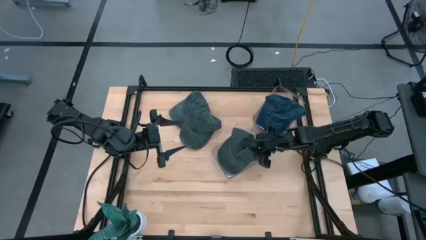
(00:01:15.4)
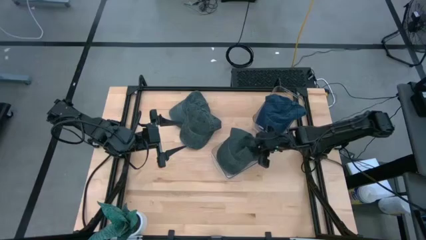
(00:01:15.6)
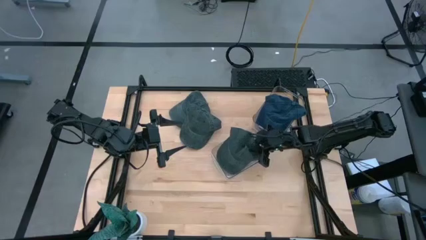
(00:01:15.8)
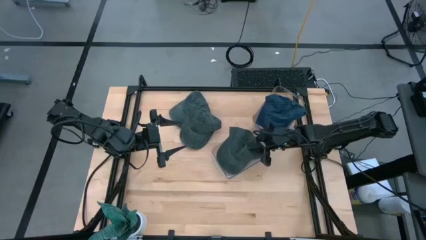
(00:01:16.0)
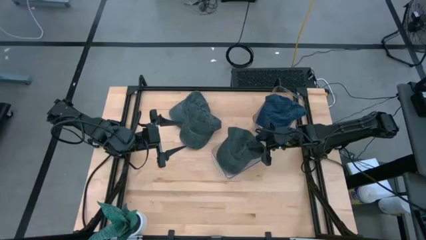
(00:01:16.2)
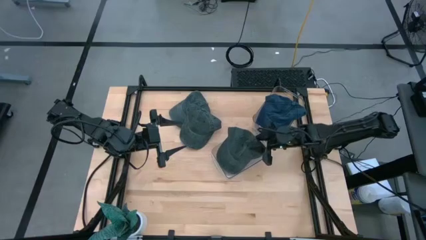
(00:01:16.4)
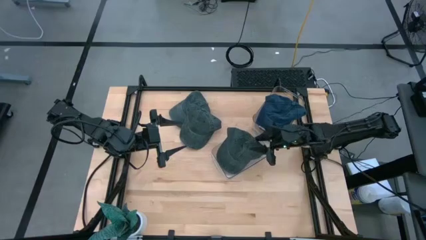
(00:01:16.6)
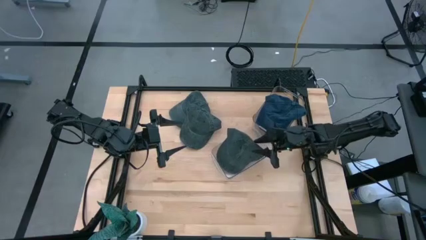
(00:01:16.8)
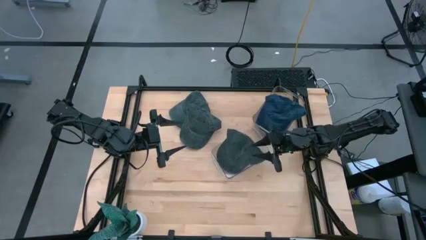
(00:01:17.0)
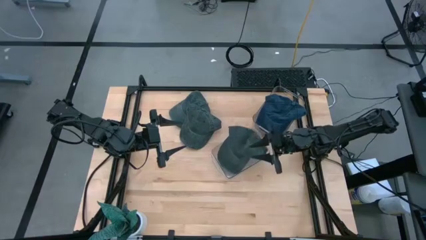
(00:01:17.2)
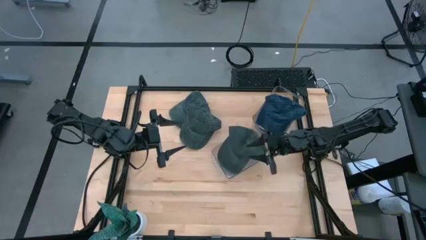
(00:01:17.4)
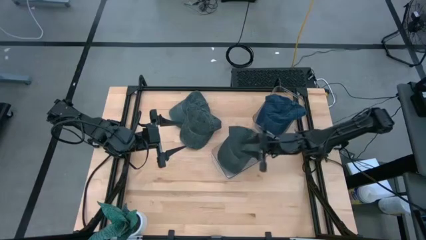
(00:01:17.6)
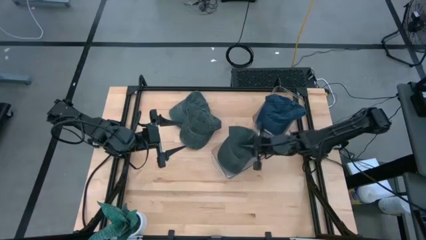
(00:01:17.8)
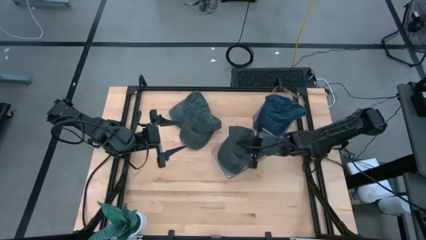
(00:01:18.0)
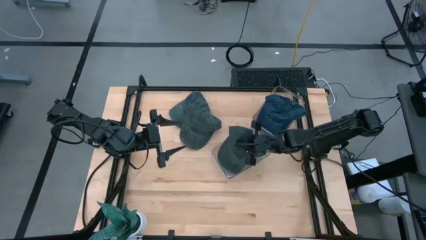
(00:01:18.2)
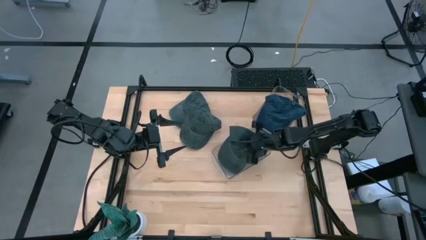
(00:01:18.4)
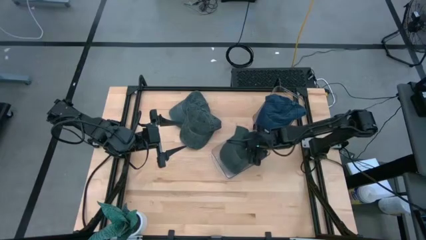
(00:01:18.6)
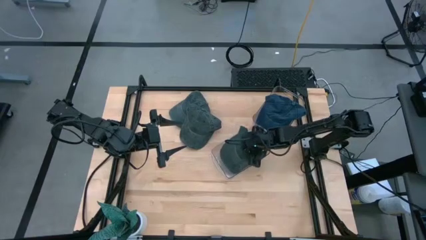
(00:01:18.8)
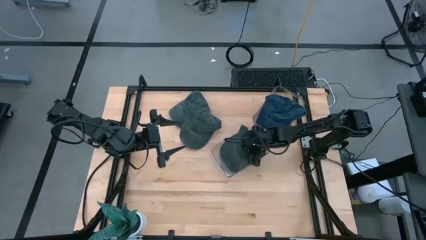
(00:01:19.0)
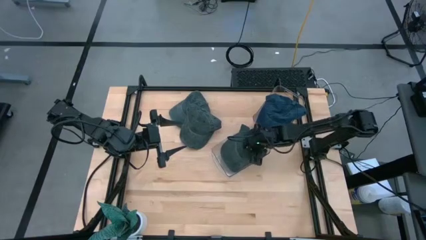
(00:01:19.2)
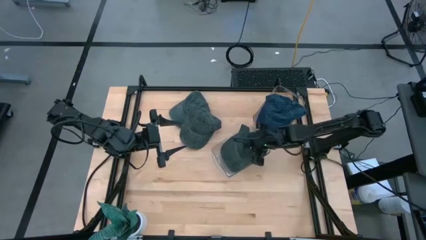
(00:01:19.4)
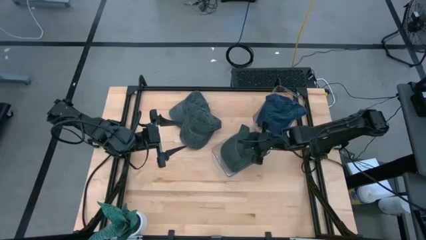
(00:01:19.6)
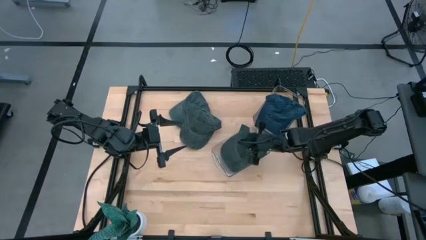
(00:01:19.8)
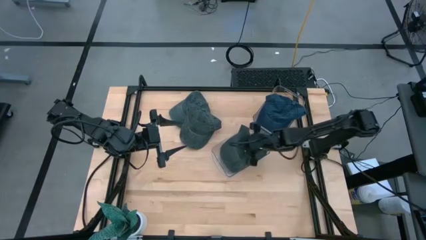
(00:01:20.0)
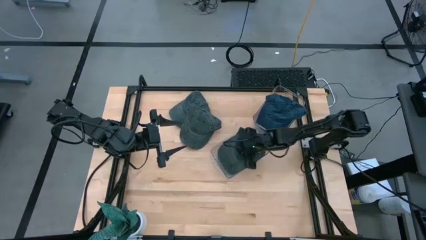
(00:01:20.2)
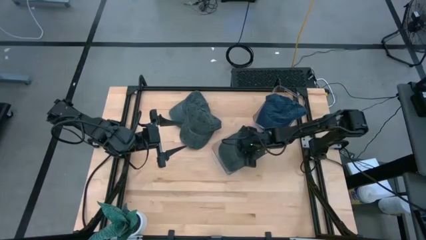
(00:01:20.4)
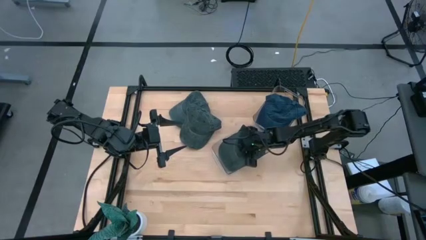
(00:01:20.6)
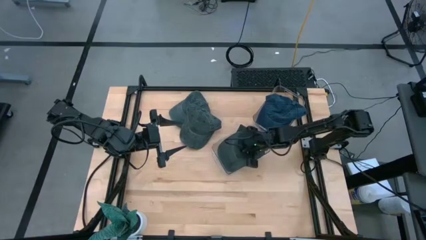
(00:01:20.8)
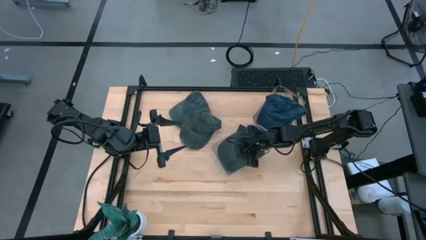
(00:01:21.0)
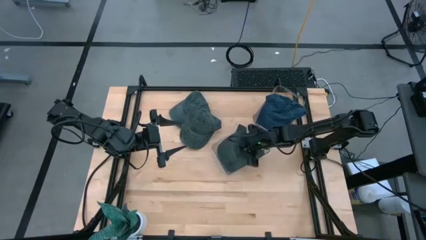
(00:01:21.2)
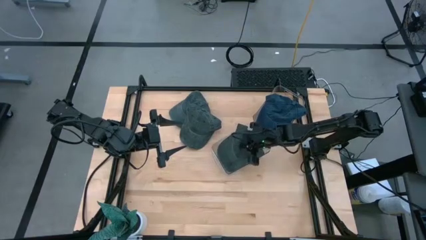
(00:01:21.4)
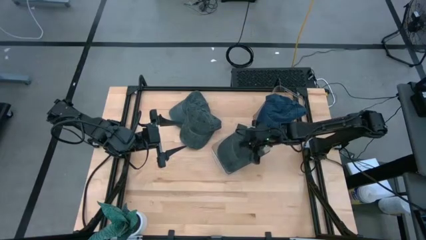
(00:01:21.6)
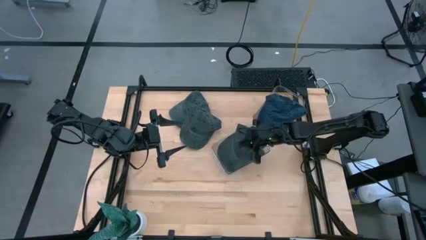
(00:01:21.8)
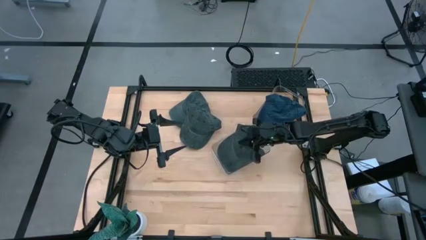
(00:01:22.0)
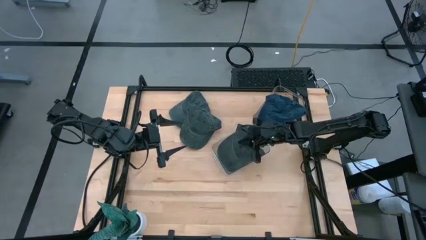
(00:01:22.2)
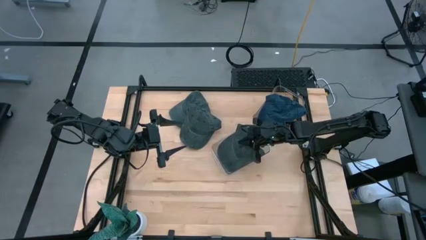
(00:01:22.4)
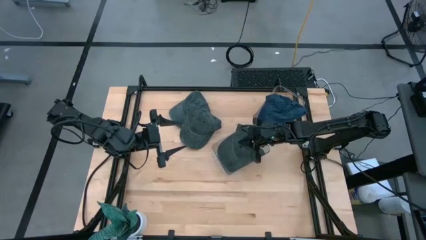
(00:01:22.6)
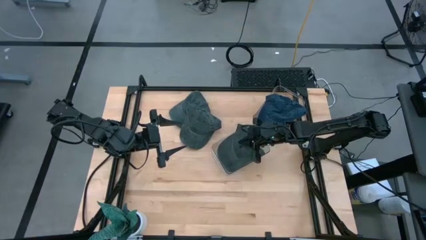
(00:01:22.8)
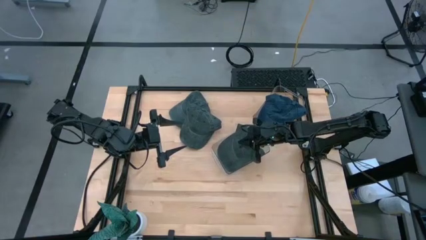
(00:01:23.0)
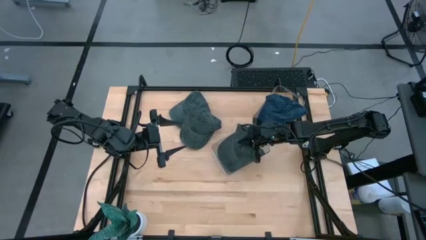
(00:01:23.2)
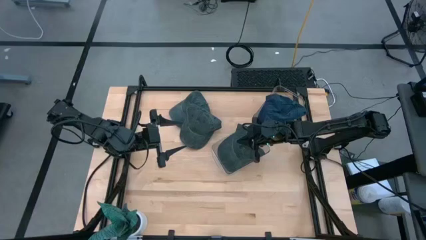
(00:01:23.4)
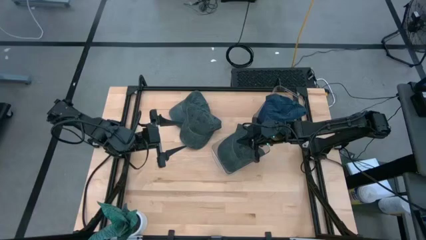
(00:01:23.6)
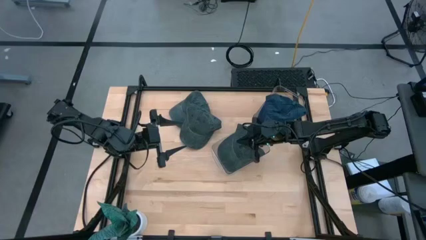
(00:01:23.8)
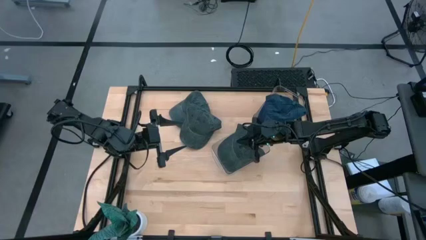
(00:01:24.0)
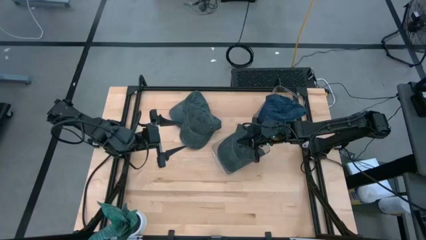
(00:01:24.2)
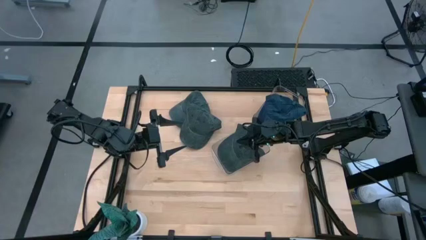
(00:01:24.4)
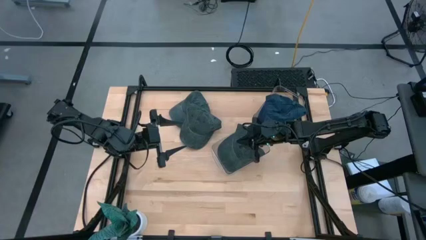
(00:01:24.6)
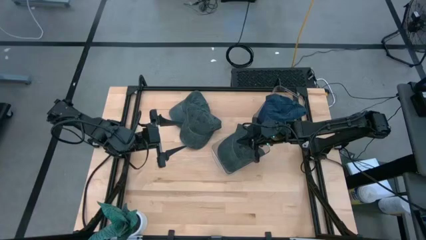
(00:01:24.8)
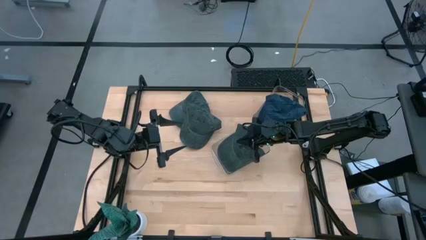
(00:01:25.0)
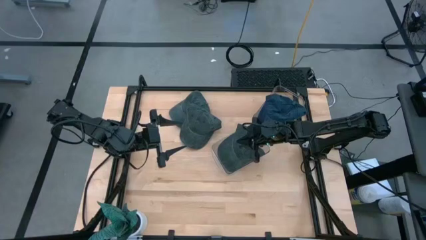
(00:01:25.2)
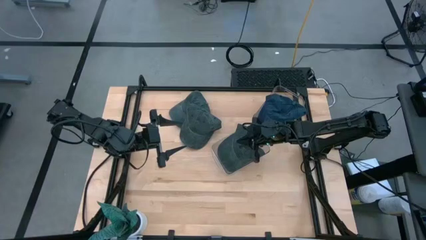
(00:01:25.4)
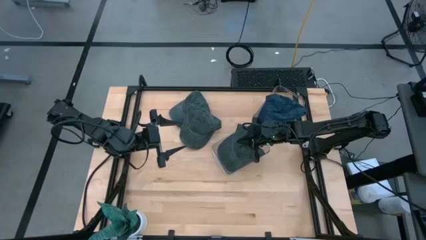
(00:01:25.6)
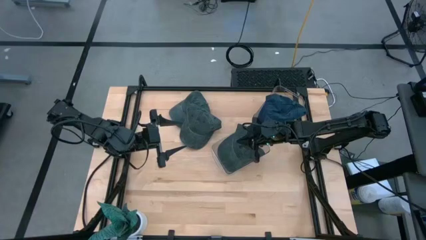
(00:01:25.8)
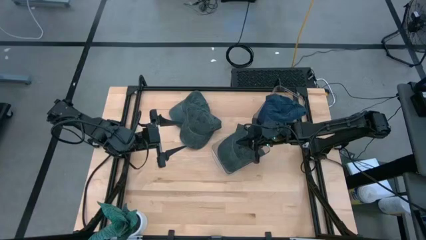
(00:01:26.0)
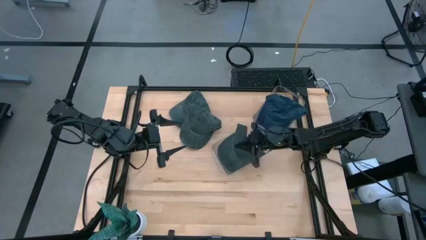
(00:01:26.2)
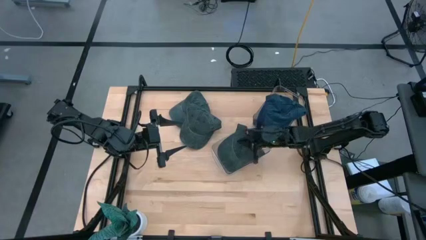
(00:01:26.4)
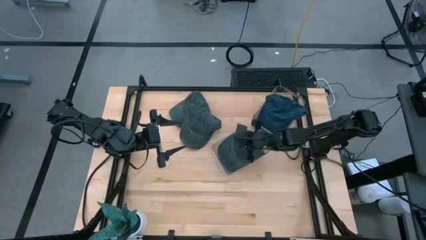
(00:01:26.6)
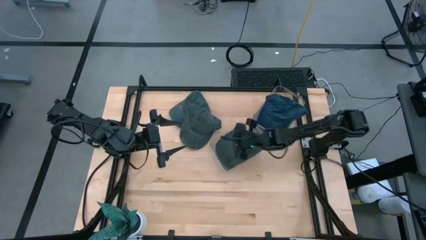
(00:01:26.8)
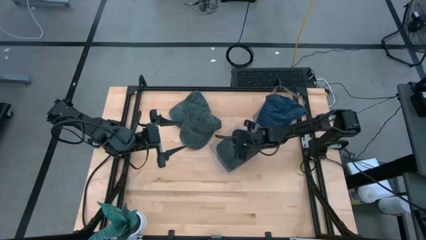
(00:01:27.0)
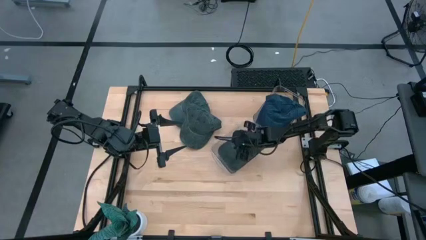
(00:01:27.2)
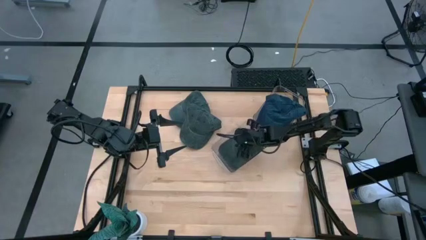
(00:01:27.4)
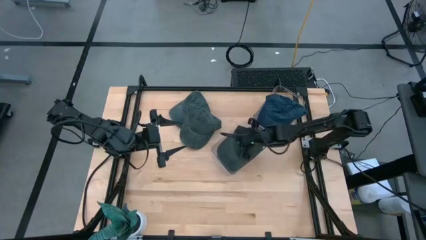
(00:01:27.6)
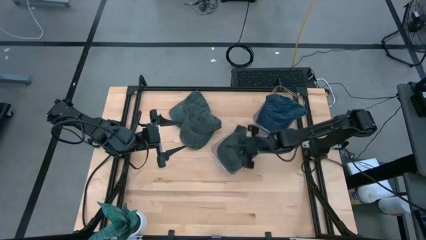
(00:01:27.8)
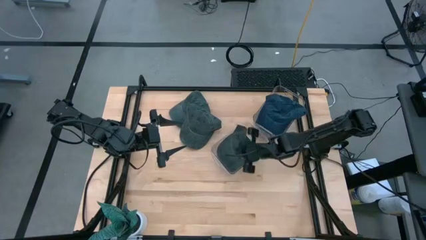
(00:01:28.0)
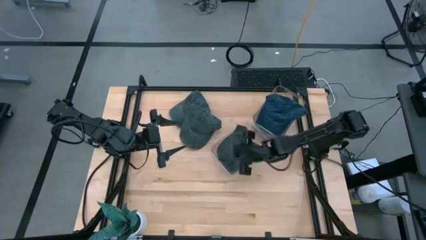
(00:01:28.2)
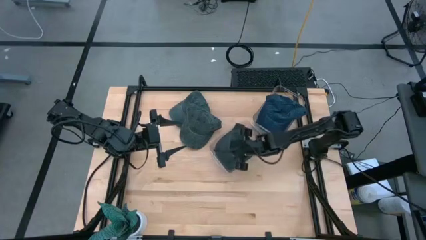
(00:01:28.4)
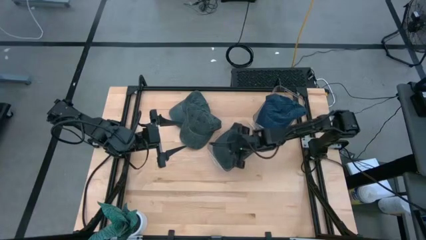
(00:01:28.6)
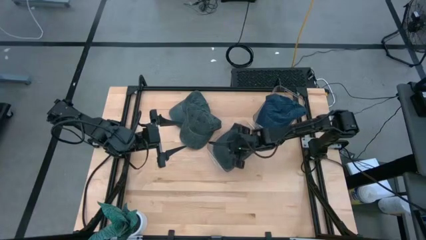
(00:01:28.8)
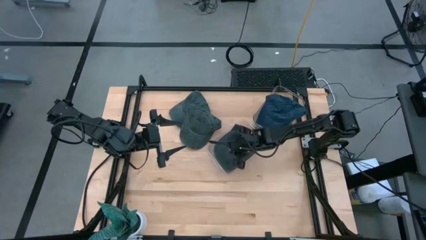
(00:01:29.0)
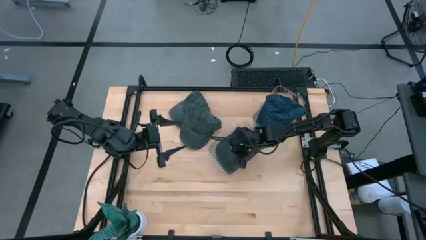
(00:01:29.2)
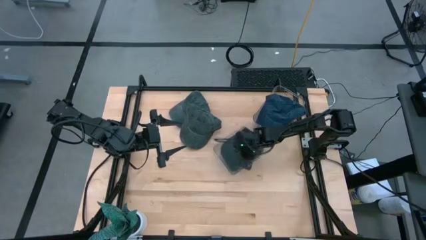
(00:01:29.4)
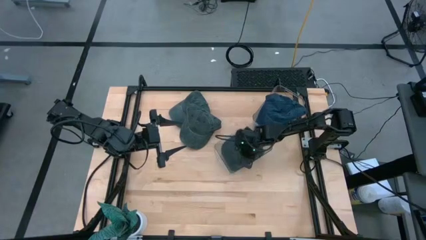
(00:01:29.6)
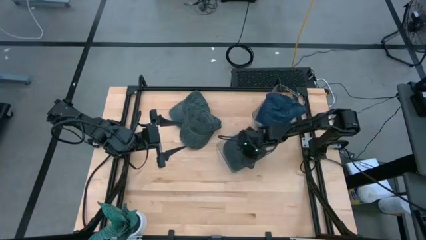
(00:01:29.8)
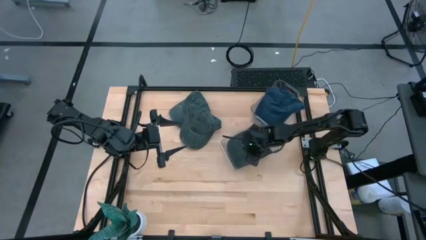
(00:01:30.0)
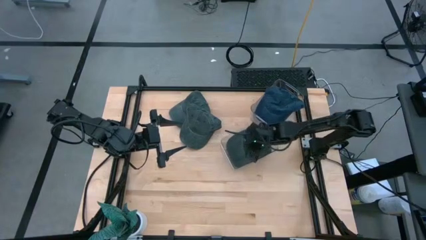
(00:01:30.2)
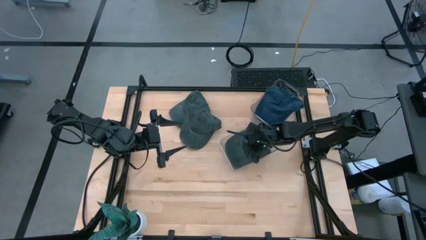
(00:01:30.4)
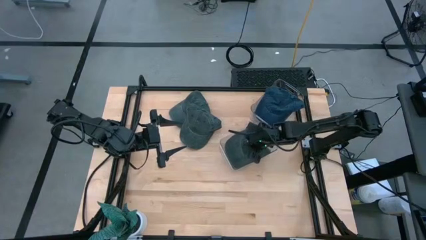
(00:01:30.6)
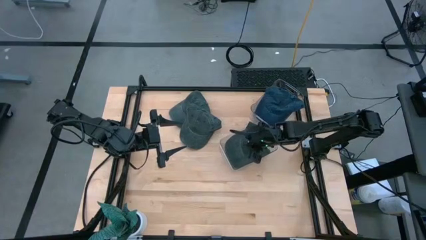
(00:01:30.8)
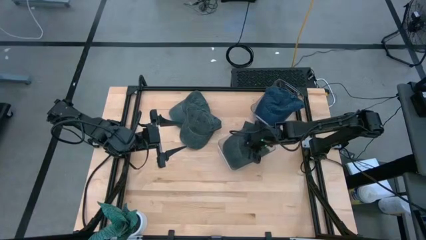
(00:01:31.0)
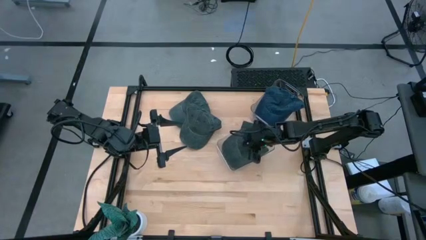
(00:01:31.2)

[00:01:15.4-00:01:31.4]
Task: Pick & Place hat
Put the bottom gray cap into the bottom transparent bin

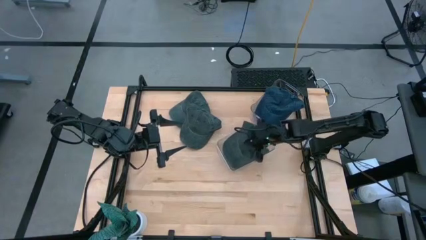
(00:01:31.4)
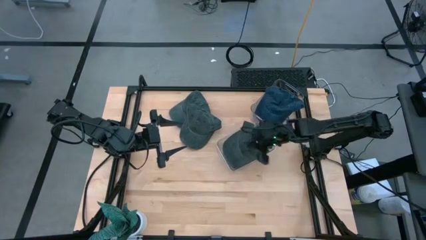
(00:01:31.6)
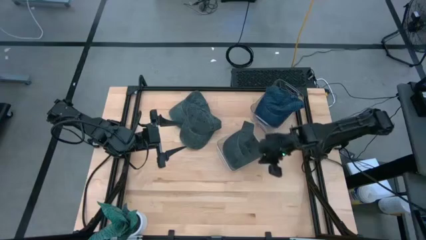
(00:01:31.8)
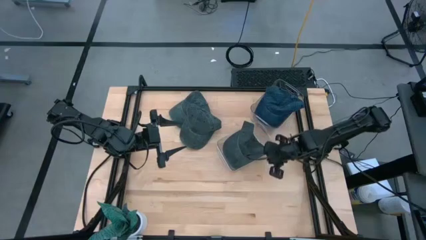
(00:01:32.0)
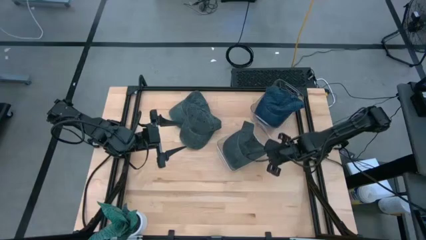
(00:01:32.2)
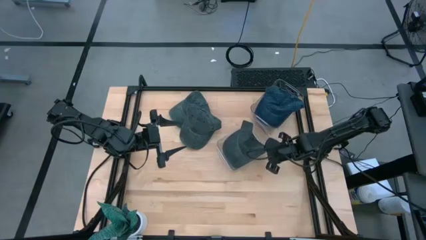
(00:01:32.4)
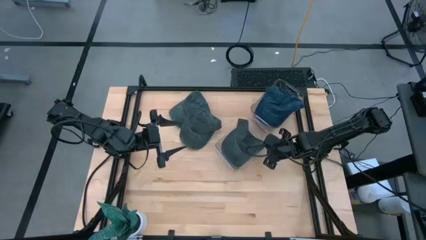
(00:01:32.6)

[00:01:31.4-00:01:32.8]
Adjust the bottom transparent bin
